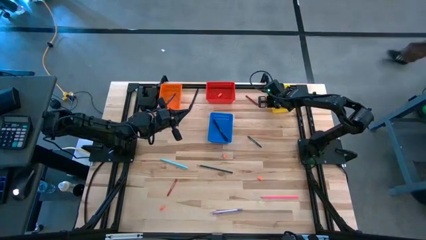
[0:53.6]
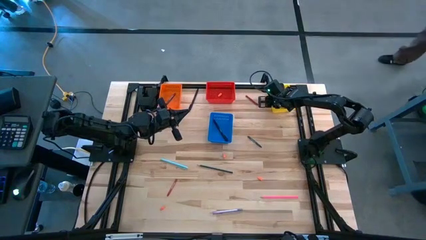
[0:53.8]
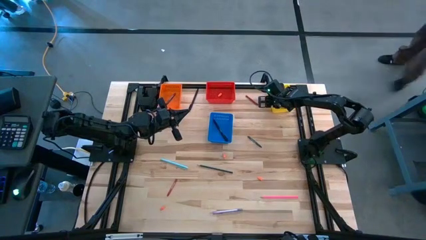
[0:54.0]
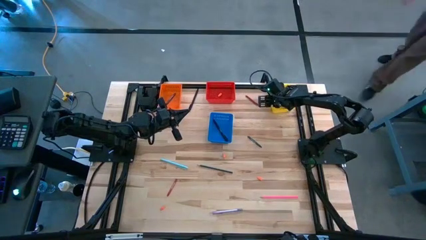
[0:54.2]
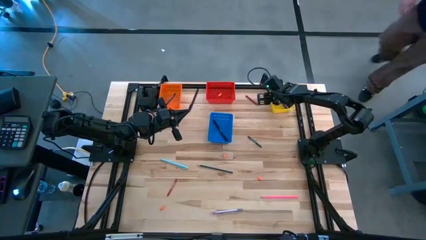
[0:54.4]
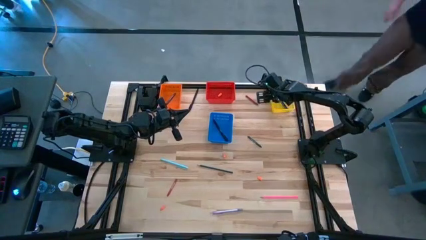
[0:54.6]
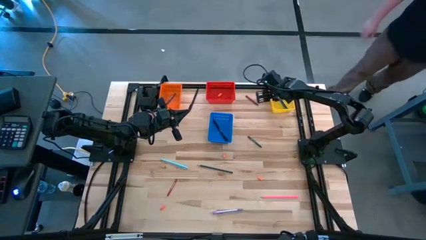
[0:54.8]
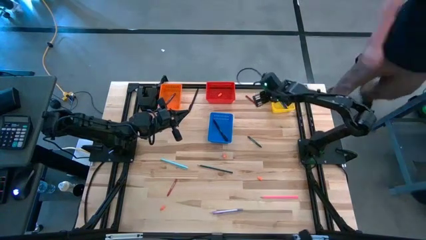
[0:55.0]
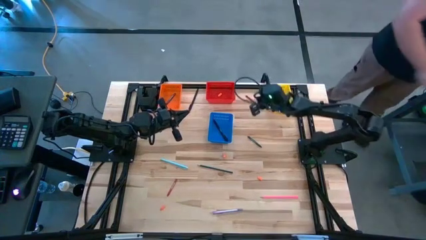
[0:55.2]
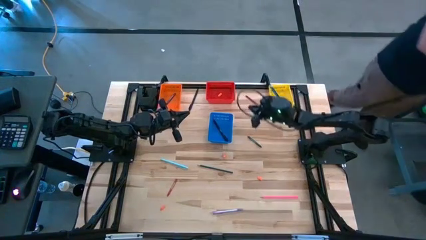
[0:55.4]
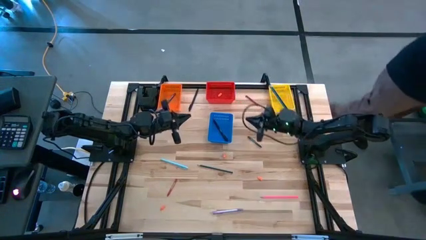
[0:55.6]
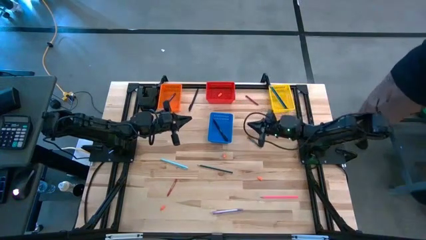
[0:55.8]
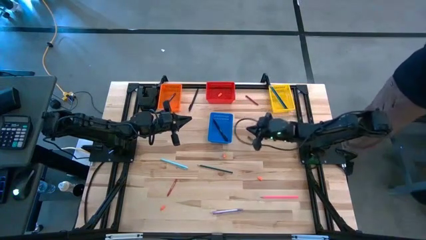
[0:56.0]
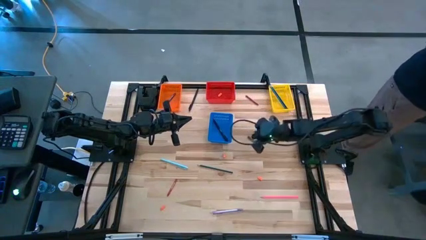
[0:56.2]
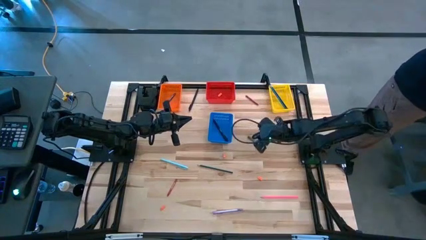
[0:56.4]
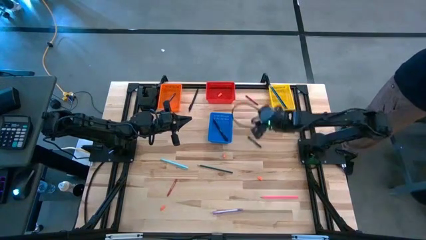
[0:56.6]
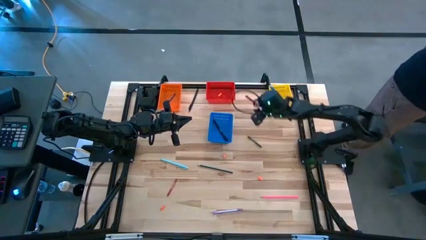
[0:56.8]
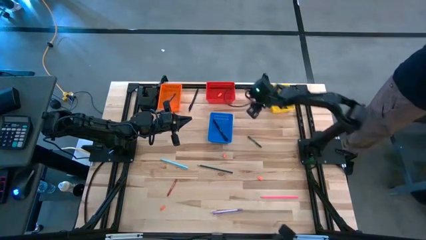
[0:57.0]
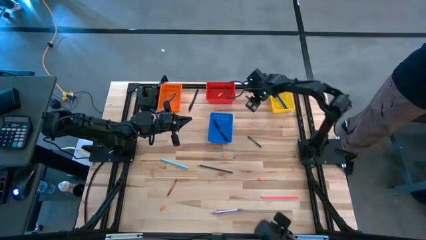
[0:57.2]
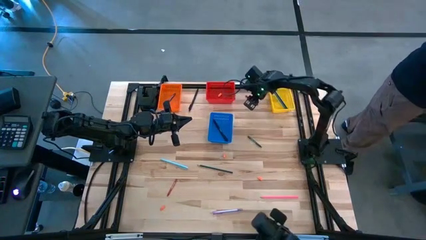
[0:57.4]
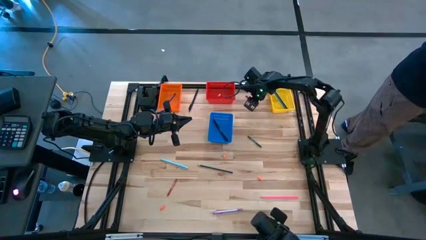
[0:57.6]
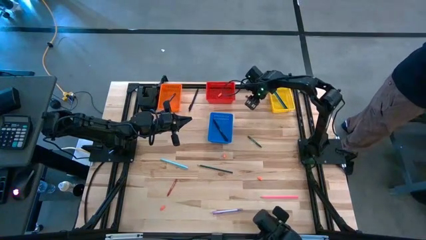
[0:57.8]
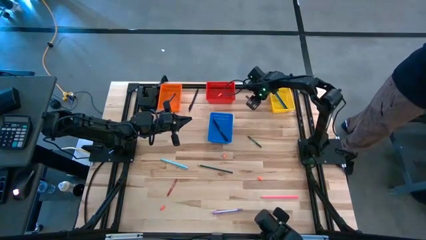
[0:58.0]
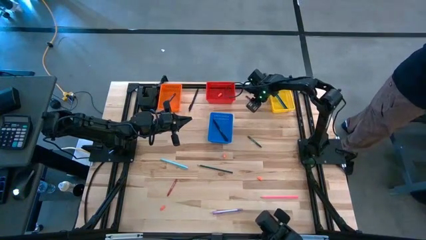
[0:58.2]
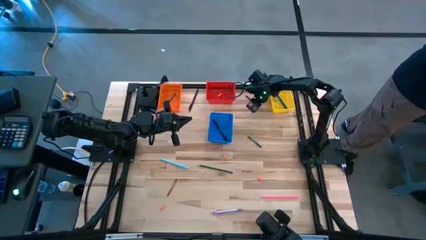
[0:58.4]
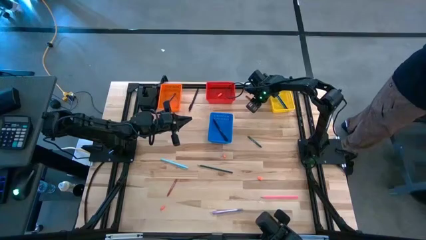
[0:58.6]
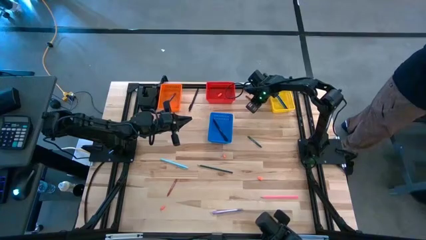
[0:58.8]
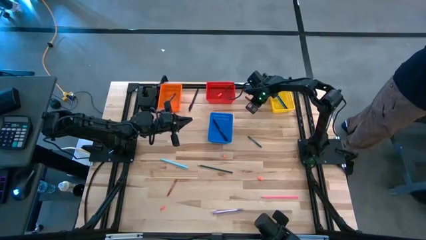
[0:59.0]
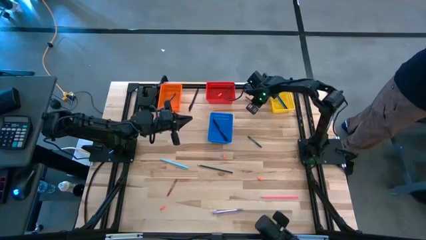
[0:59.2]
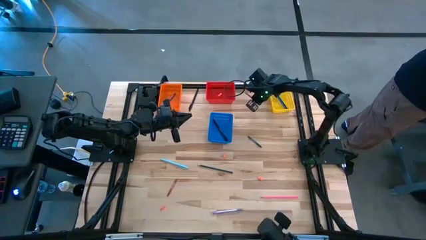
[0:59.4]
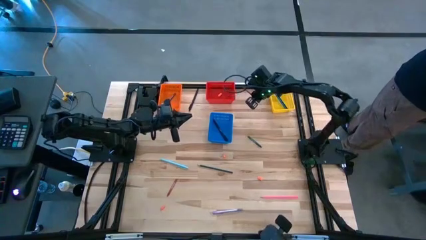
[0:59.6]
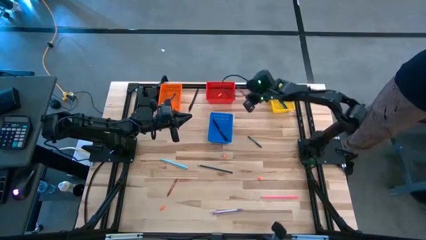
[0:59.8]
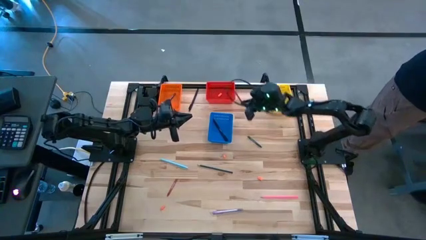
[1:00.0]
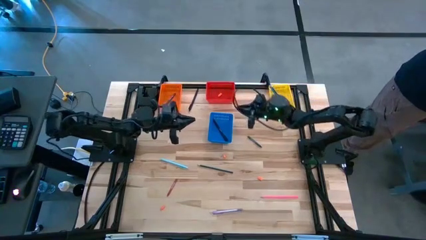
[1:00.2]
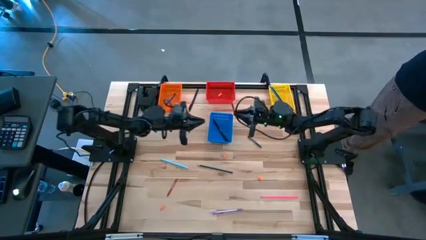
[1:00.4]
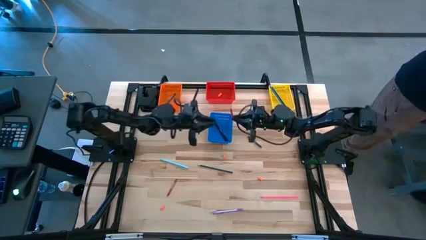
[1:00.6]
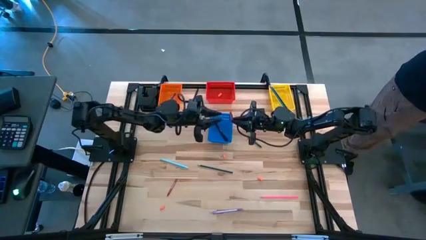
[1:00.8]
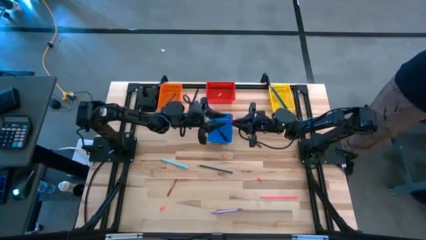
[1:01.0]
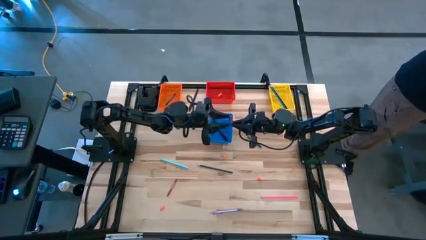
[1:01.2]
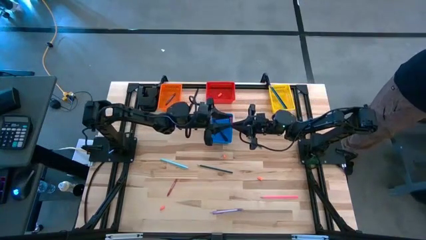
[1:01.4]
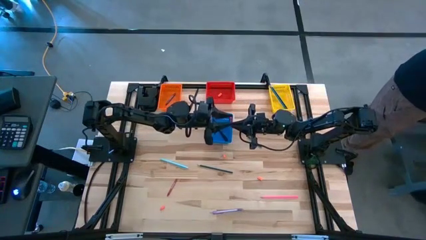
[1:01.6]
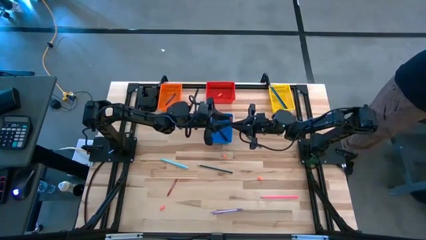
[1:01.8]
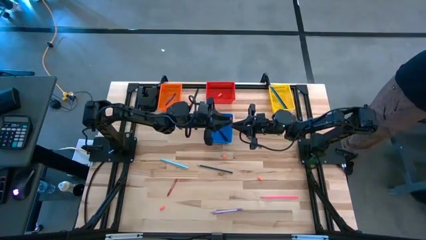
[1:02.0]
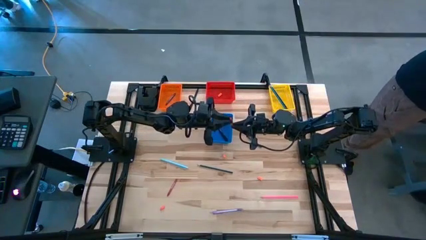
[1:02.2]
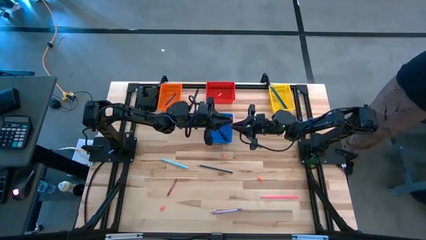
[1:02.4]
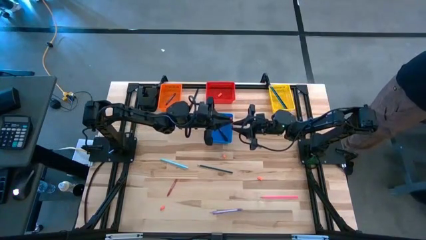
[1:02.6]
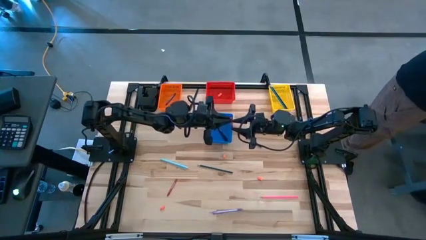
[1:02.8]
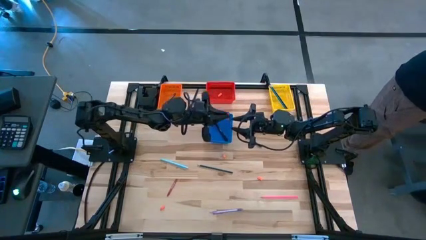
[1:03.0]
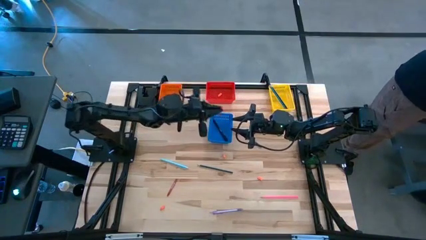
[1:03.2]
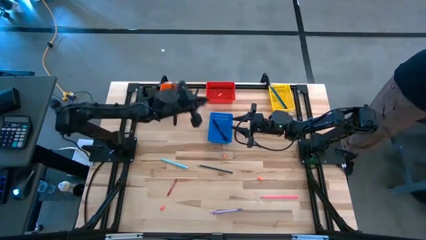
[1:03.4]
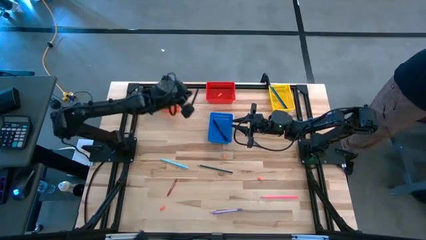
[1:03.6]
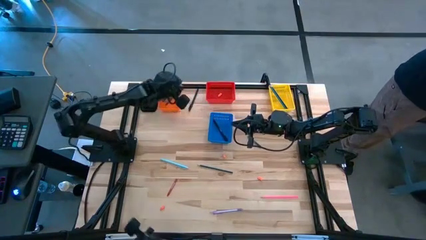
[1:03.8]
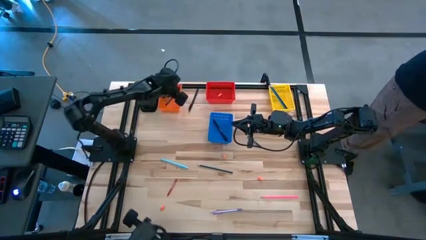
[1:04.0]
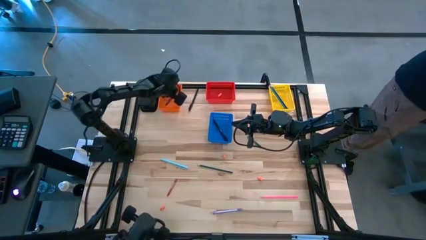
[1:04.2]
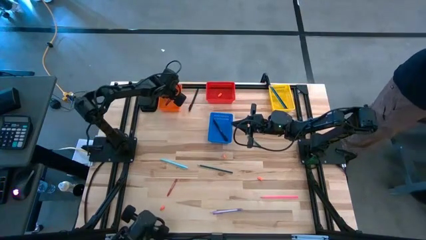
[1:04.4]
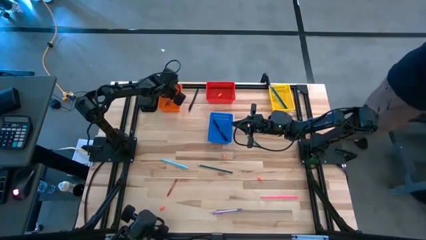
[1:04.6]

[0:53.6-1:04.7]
Task: Sort crayons/erasers/pens/pencils in bins
Put the red crayon into the orange bin

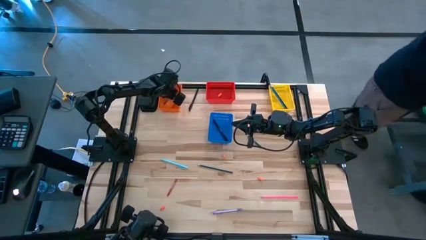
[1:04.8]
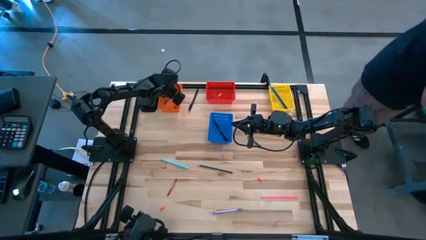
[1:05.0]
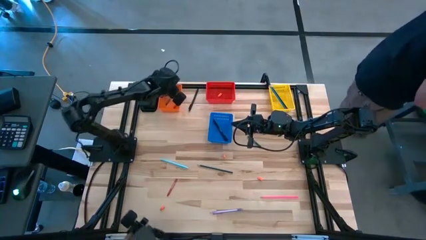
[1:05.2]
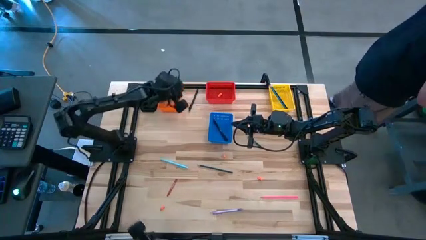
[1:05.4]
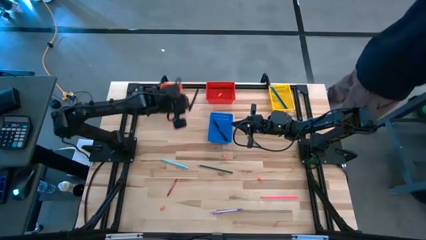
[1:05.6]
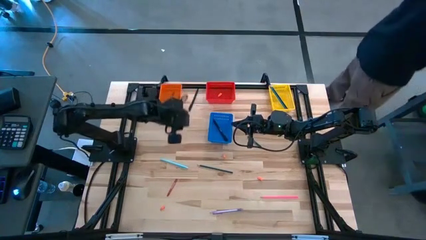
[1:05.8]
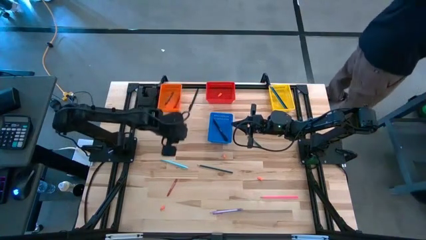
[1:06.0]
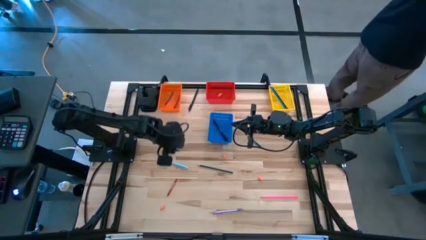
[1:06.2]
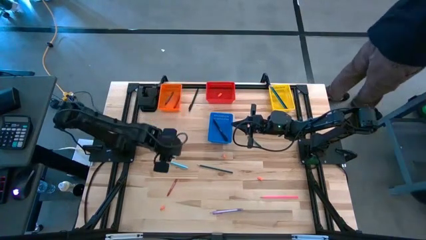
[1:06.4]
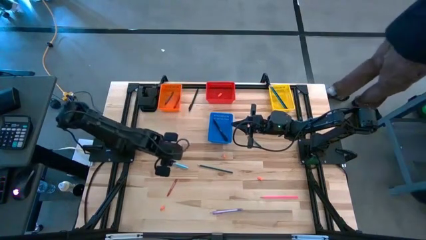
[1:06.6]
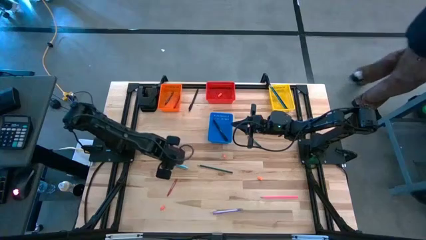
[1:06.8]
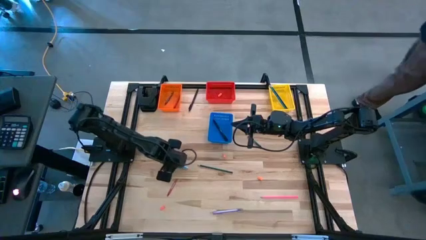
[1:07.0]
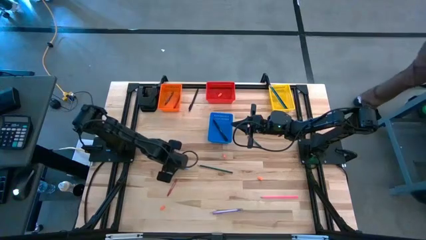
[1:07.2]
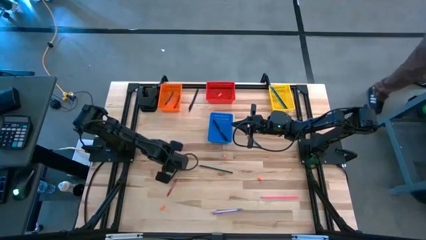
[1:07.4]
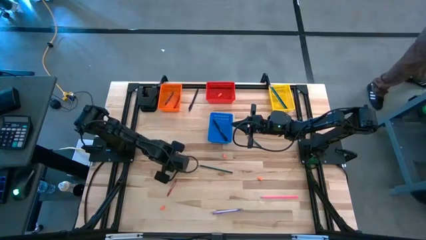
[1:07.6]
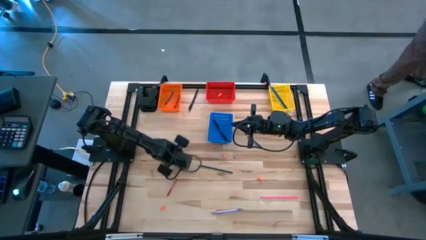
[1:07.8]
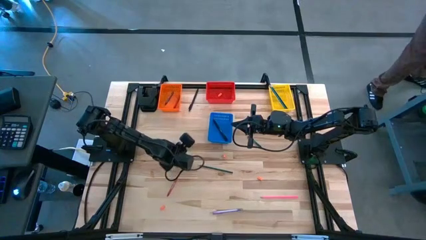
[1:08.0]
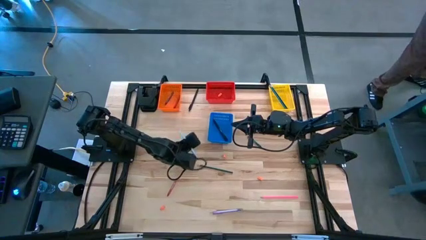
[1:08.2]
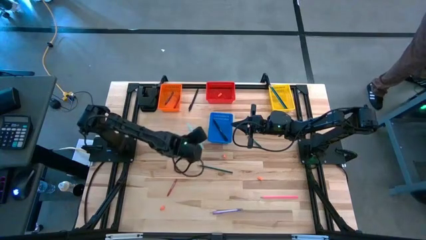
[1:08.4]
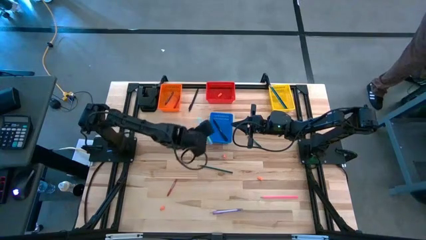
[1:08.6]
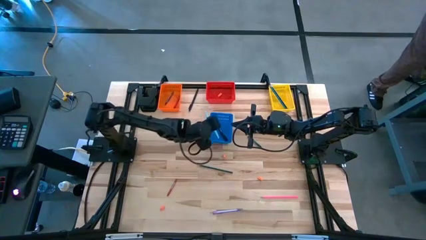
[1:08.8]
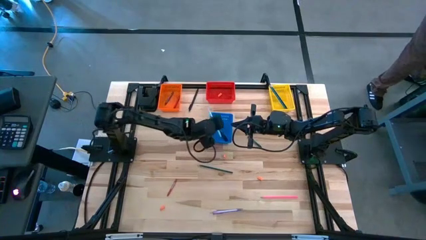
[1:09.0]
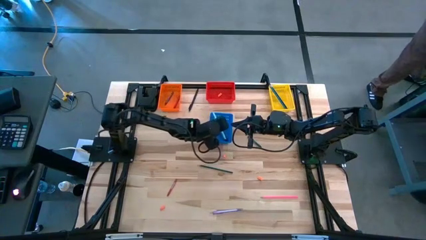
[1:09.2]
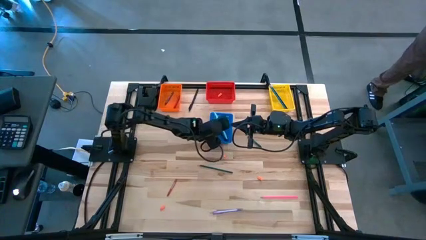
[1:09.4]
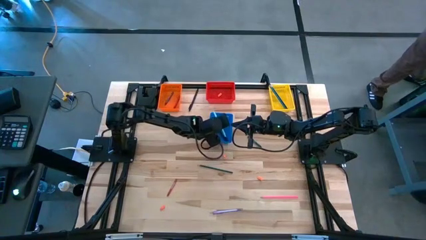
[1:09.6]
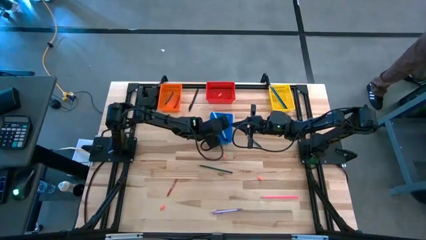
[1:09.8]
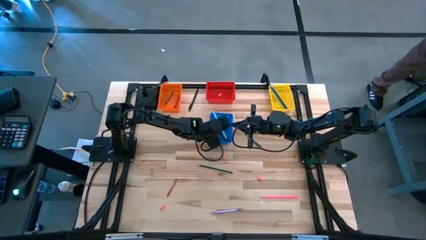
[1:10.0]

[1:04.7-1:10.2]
Put the light blue pen into the blue bin
